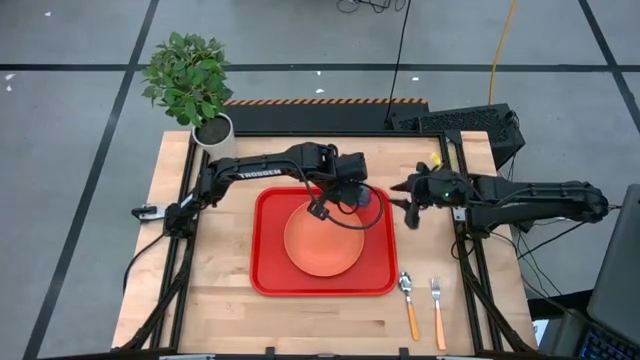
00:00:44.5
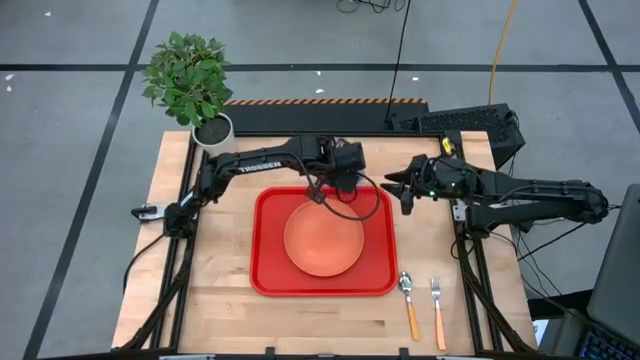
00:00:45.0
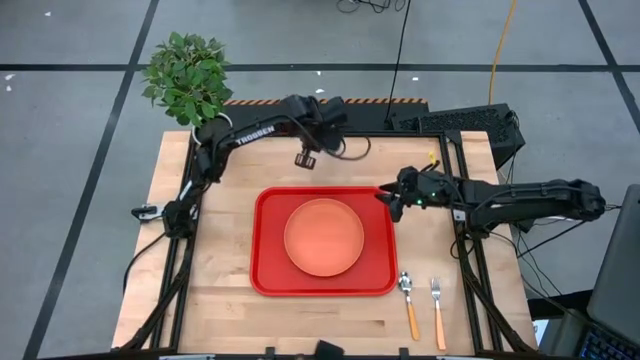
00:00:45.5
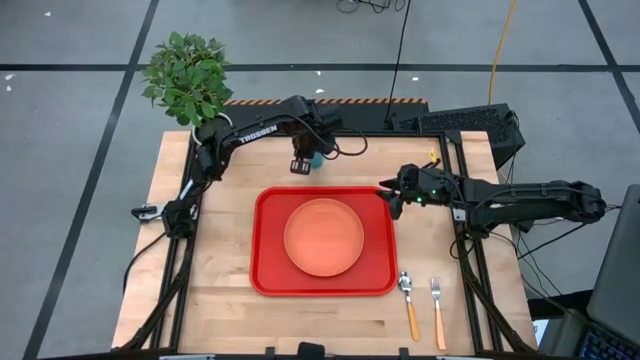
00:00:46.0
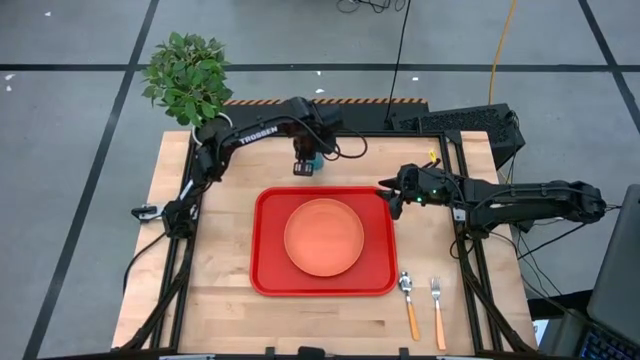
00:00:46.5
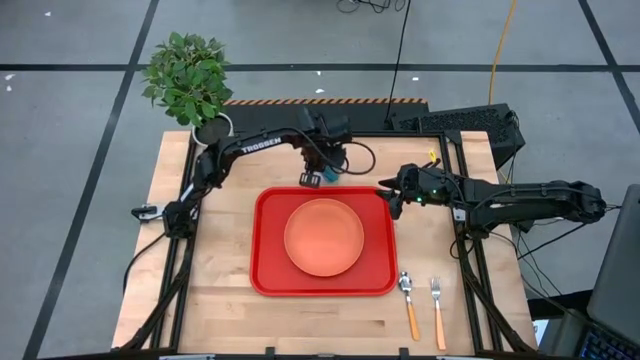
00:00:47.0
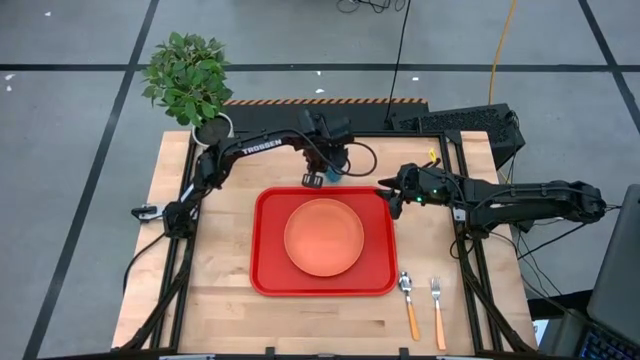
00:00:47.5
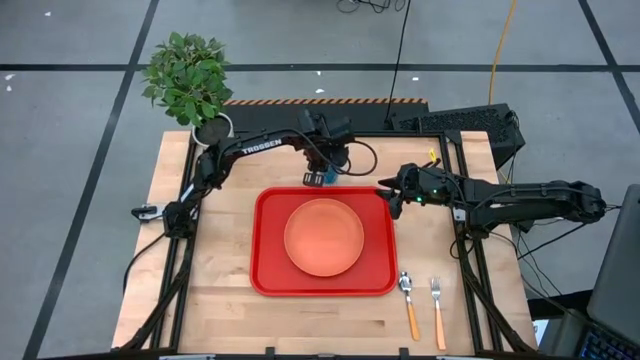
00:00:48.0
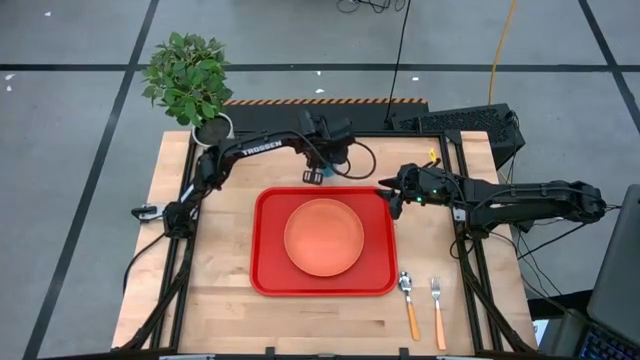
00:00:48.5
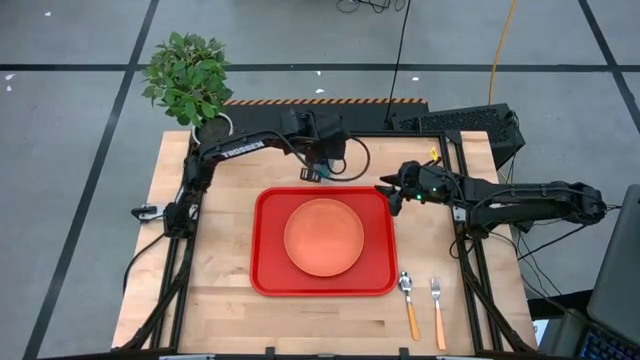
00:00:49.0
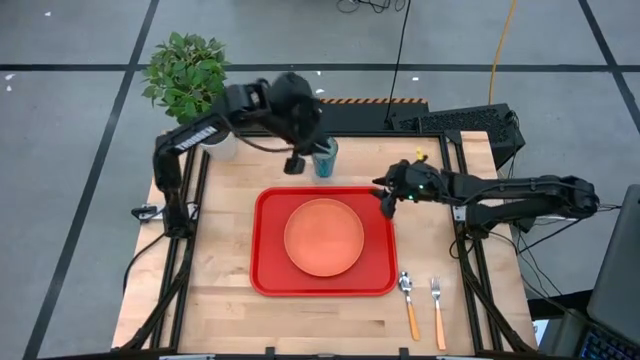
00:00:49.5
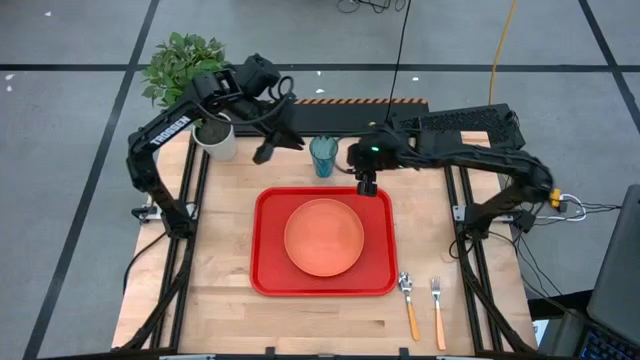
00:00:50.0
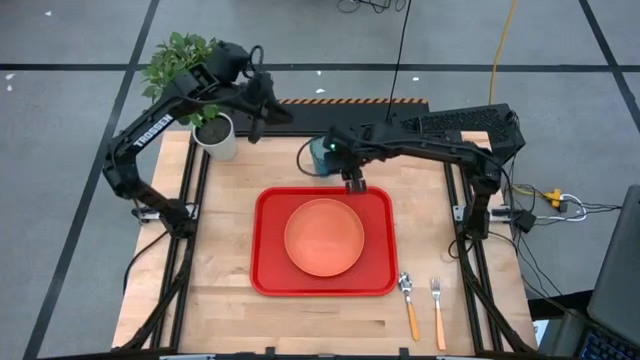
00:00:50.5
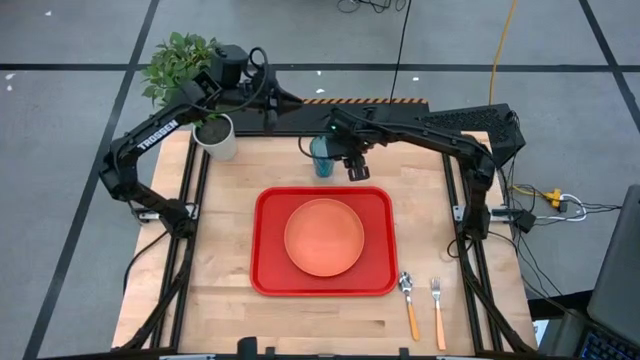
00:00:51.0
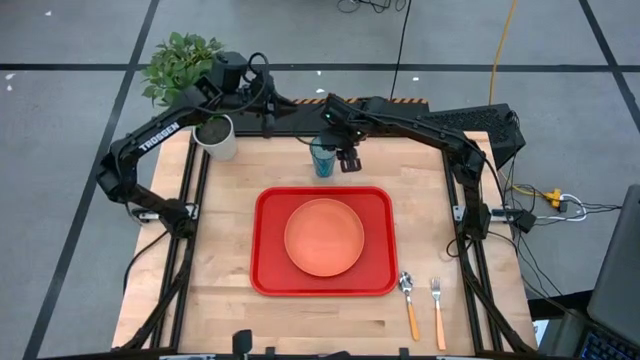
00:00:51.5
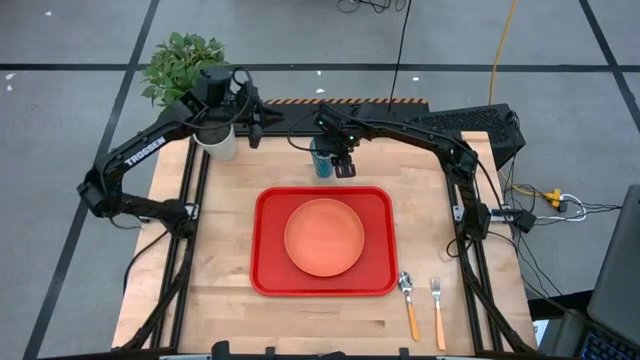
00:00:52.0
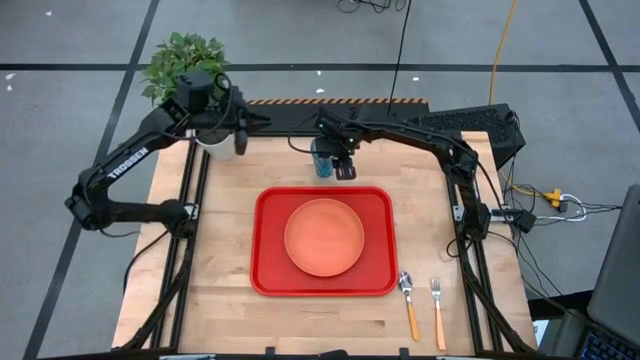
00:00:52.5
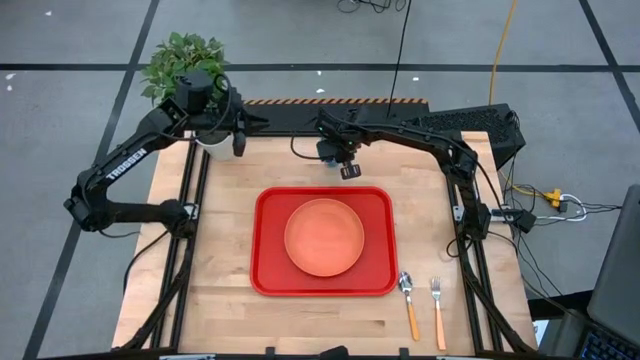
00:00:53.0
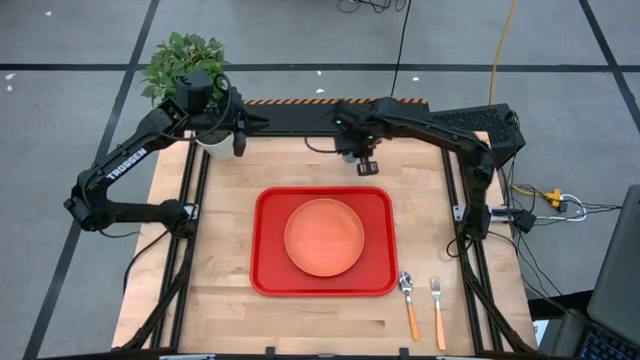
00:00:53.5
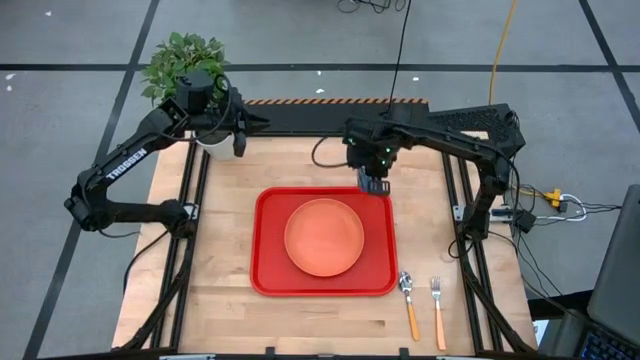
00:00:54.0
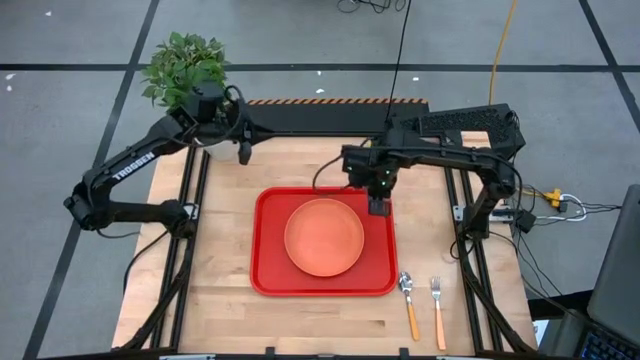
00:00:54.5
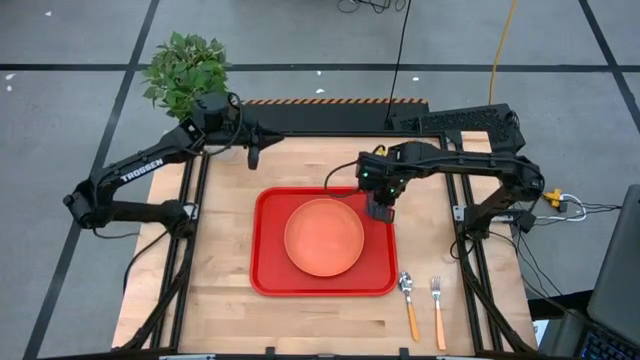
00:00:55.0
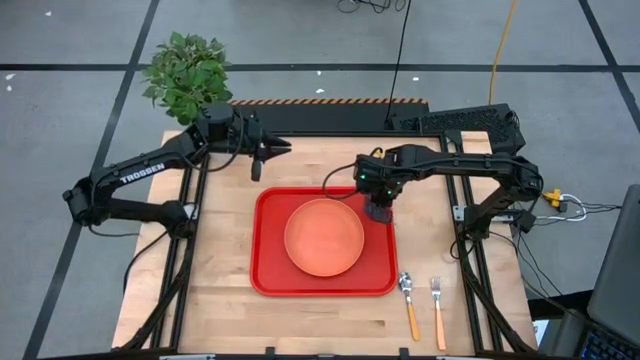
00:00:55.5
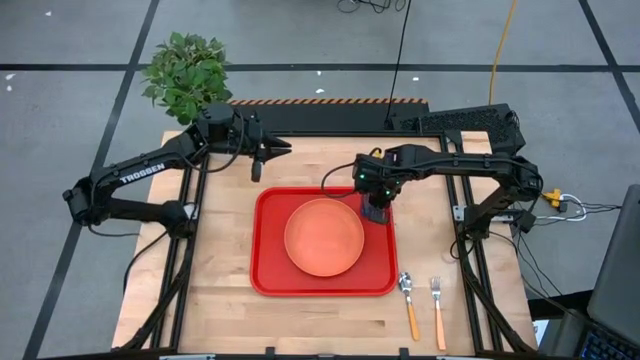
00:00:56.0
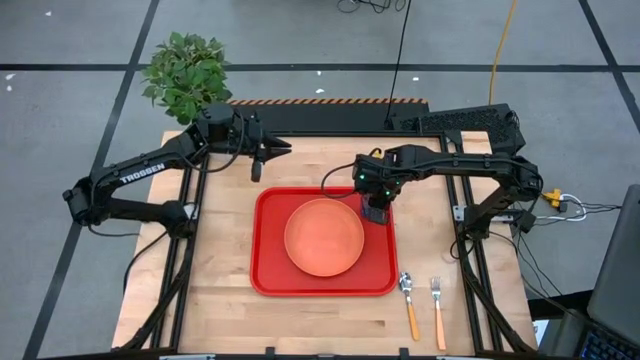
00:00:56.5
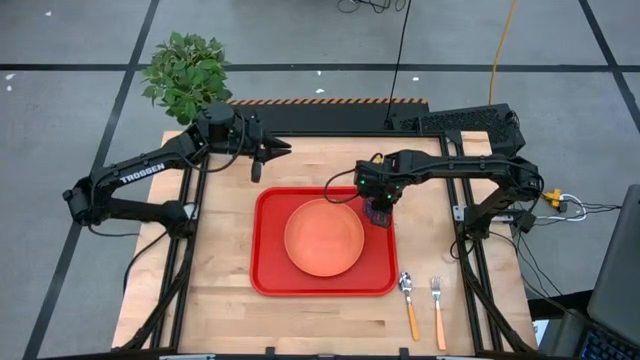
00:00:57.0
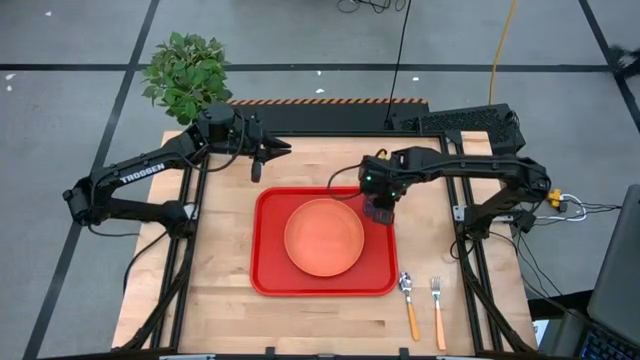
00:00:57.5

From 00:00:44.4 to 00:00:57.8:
Task: Pick and place plate/cup/fork/spoon on tray
Put the blue cup on the red tray to the top right of the orange plate

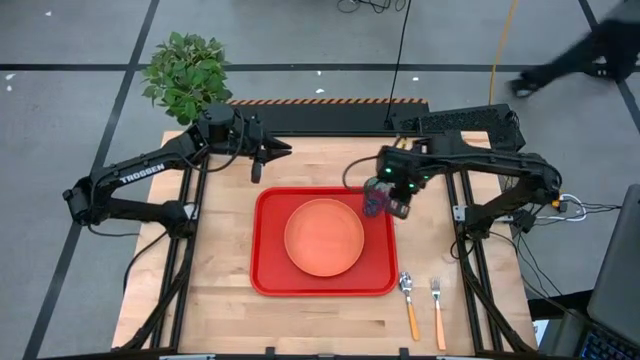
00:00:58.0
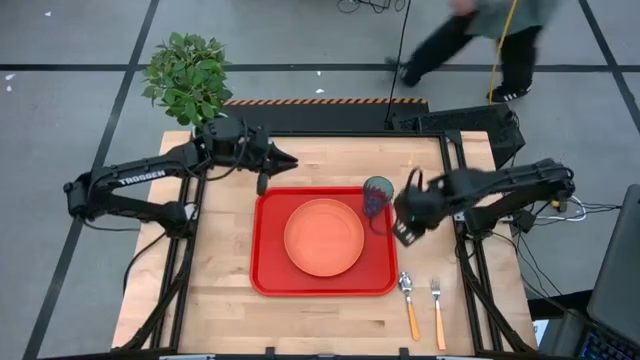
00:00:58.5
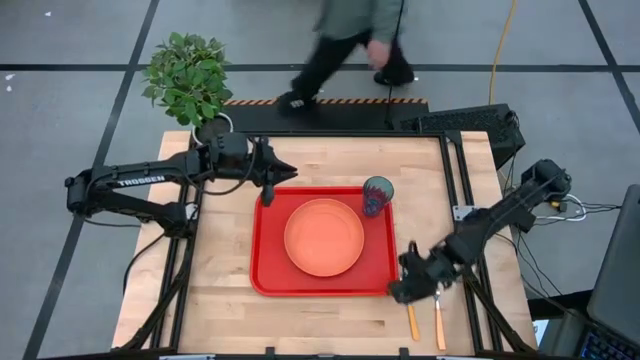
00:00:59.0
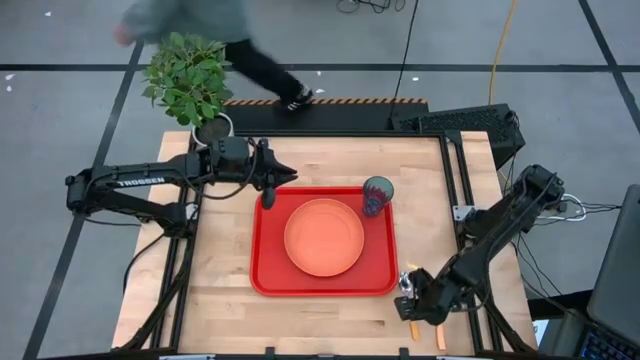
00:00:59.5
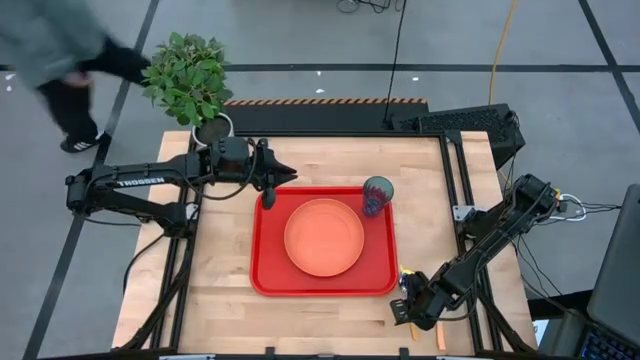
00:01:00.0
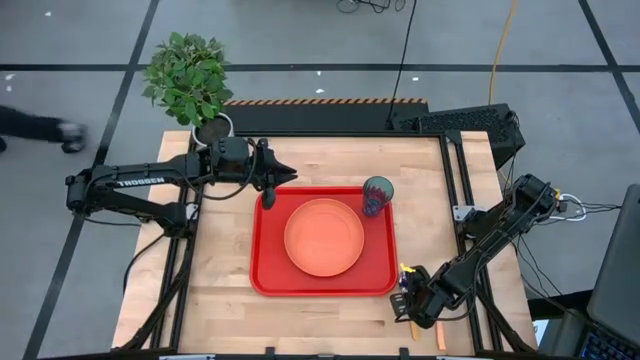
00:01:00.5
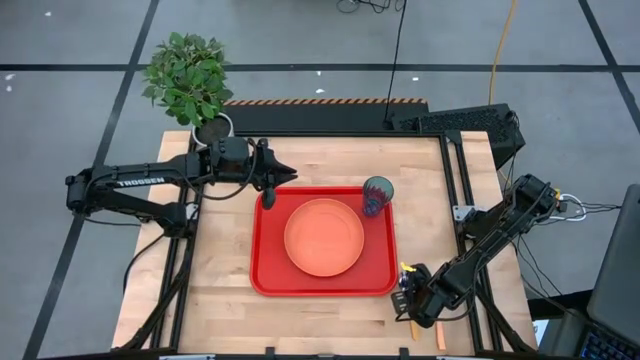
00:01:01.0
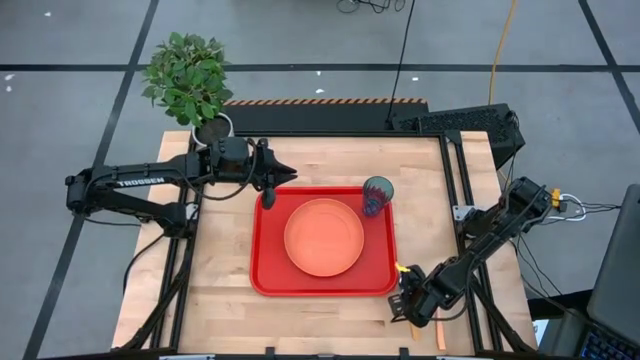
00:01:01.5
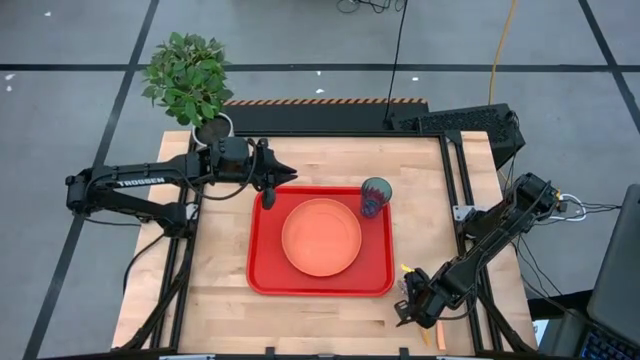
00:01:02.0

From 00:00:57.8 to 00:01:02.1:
Put the yellow spoon on the red tray to the left of the orange plate

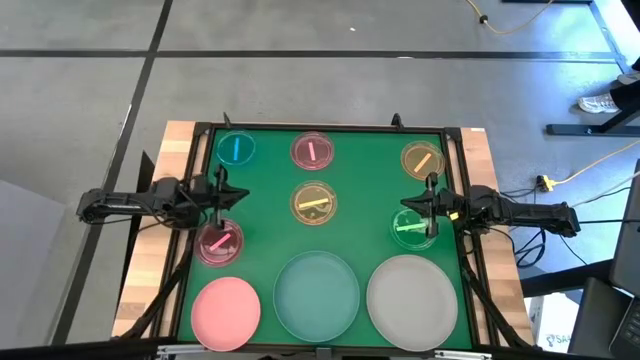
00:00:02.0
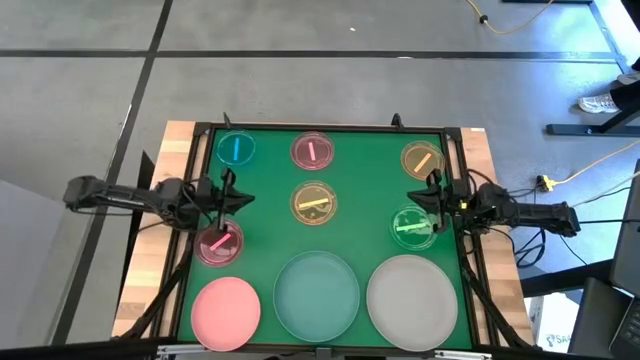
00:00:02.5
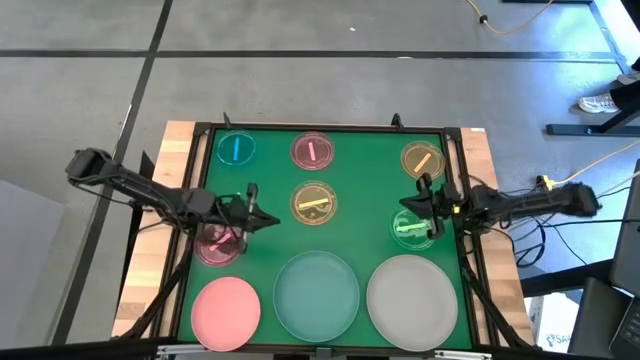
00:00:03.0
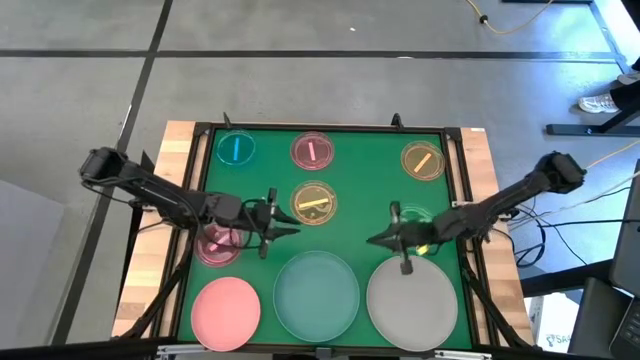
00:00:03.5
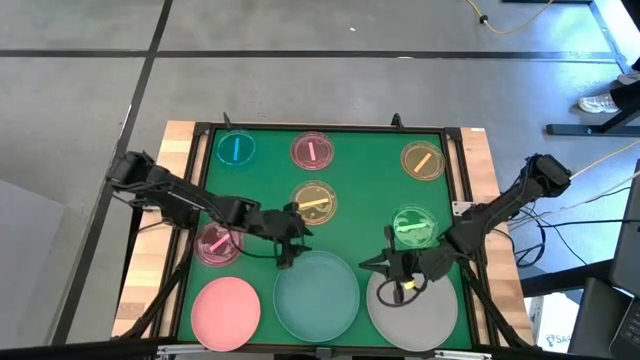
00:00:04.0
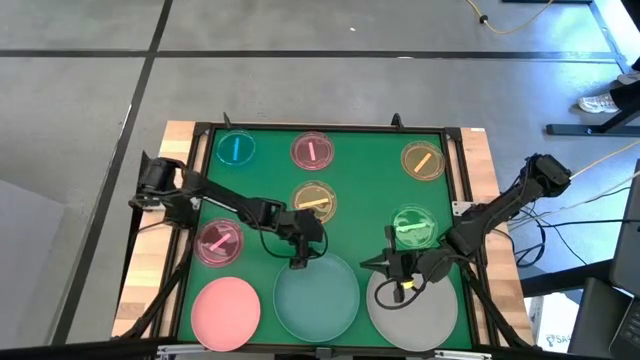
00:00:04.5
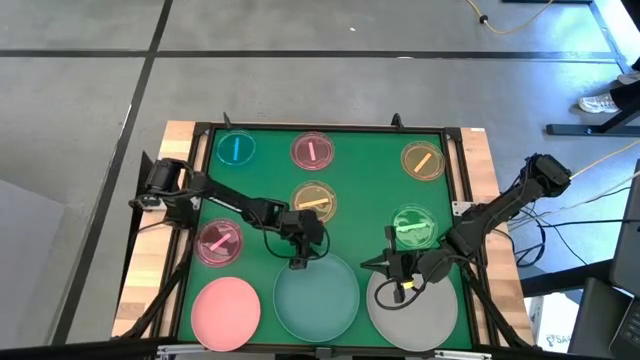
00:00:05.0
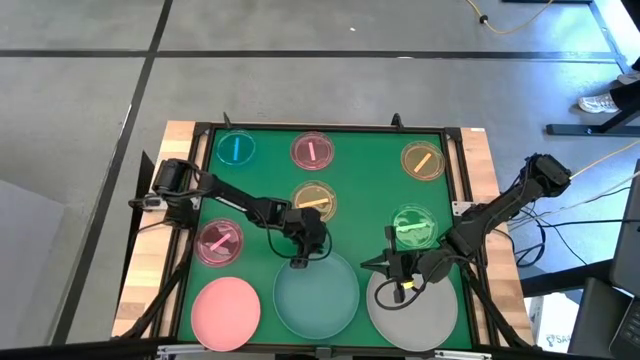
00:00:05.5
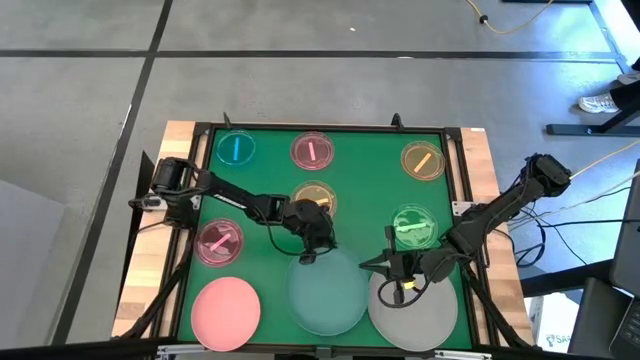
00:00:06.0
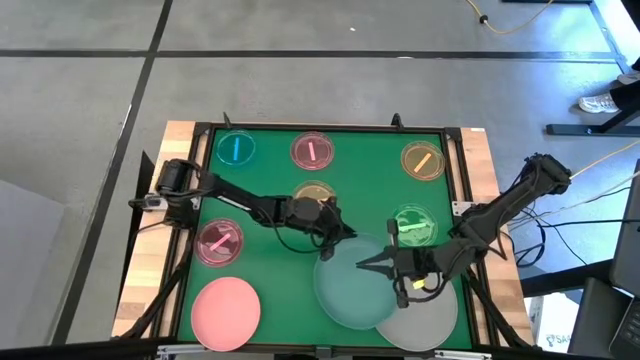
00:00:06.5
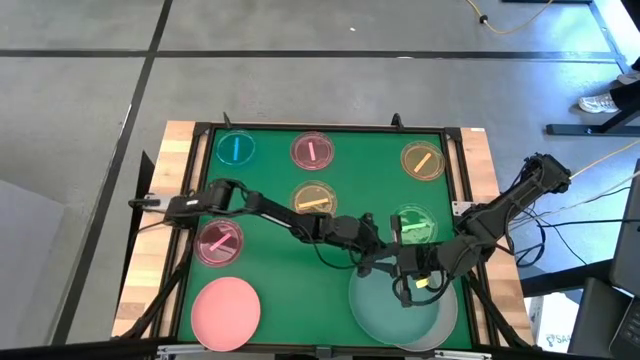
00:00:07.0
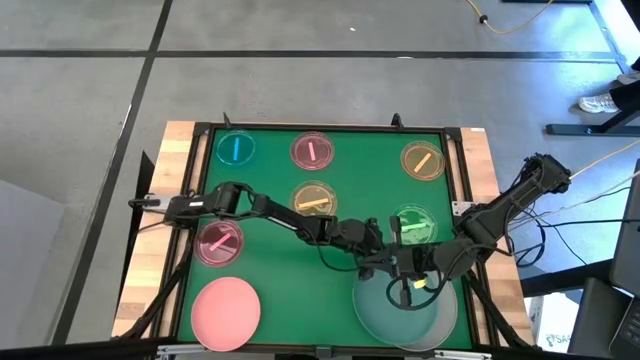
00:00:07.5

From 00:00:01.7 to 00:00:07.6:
Task: Stack plastic plates
Stack the green plate on top of the gray plate
